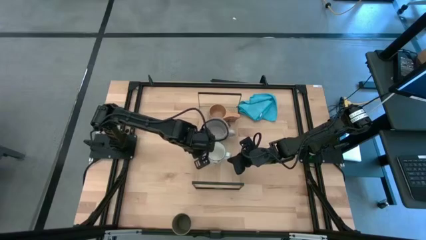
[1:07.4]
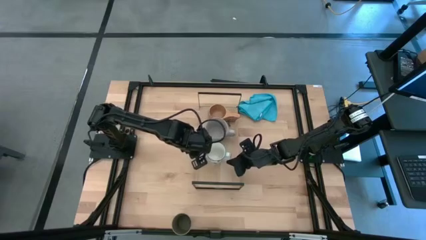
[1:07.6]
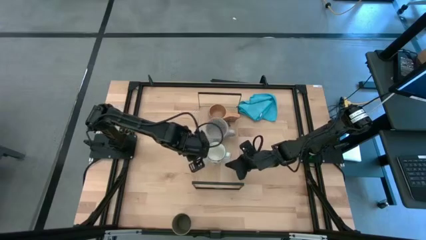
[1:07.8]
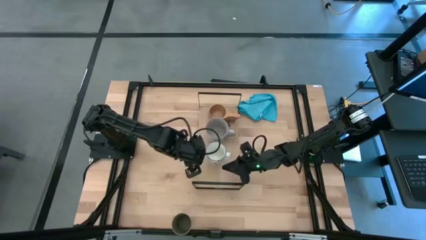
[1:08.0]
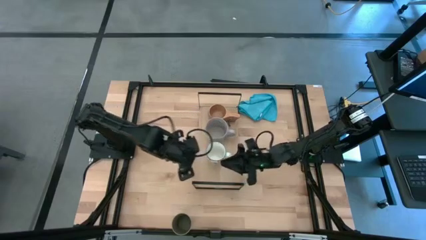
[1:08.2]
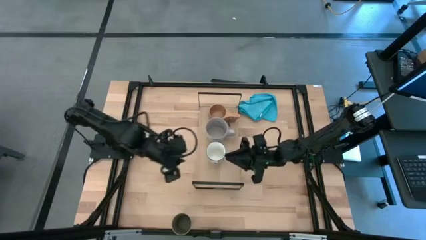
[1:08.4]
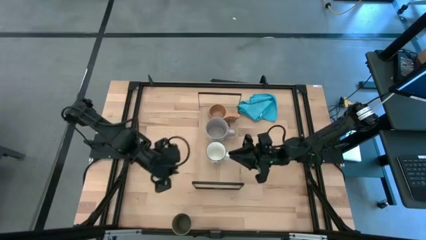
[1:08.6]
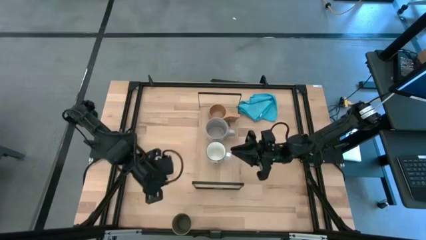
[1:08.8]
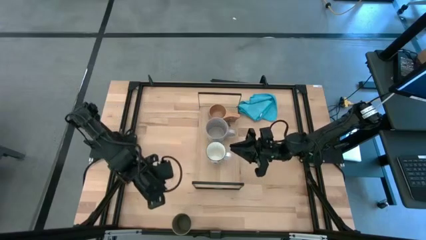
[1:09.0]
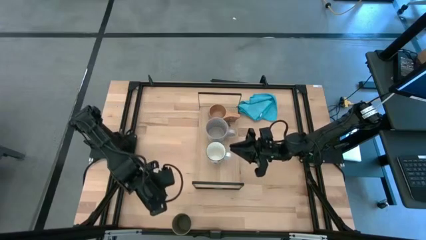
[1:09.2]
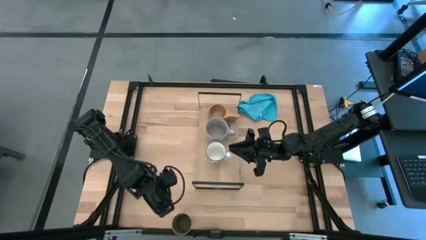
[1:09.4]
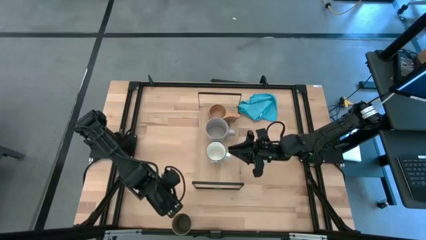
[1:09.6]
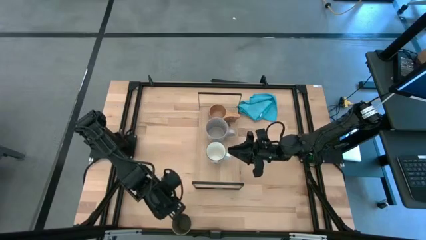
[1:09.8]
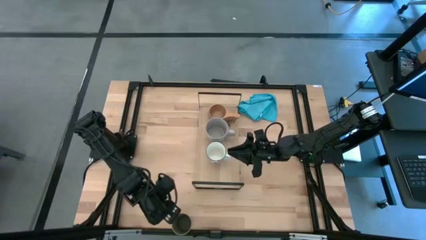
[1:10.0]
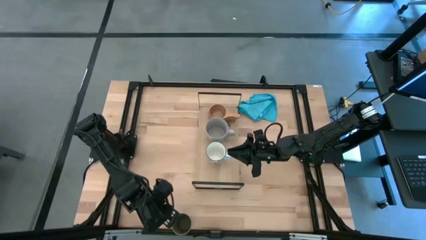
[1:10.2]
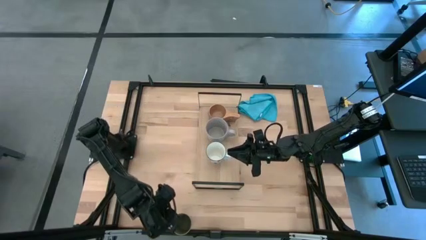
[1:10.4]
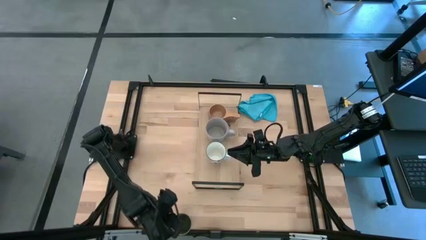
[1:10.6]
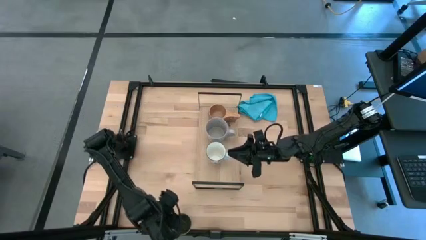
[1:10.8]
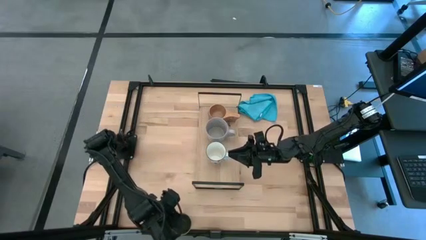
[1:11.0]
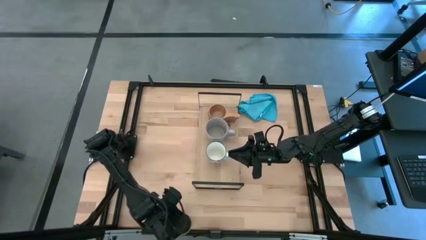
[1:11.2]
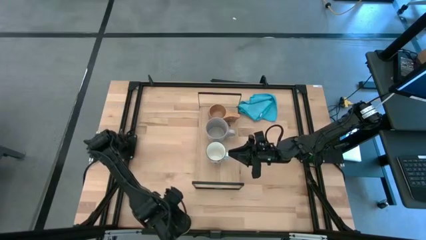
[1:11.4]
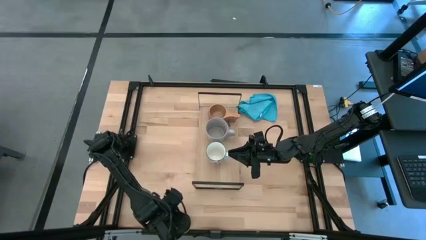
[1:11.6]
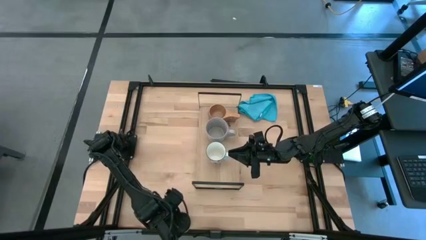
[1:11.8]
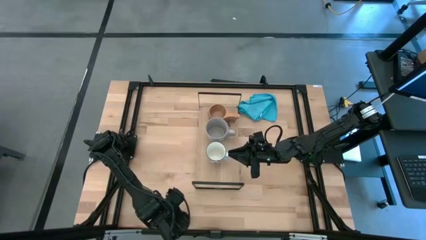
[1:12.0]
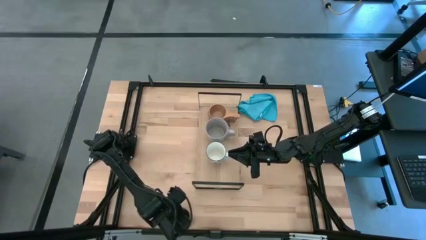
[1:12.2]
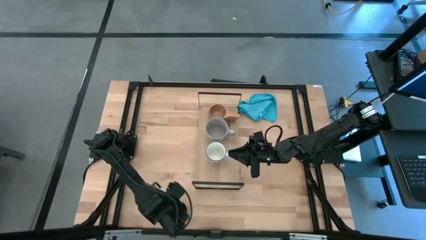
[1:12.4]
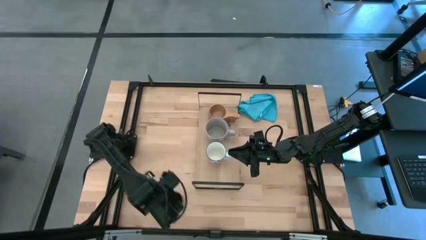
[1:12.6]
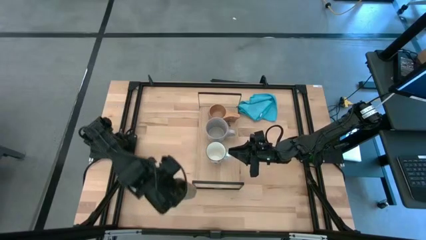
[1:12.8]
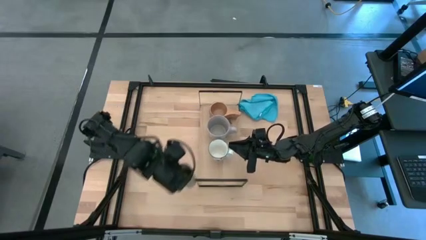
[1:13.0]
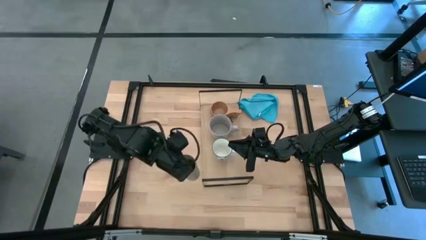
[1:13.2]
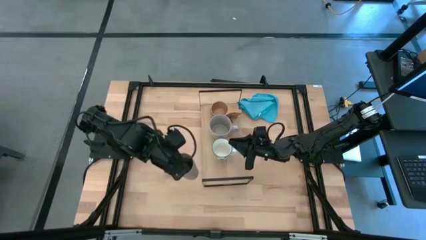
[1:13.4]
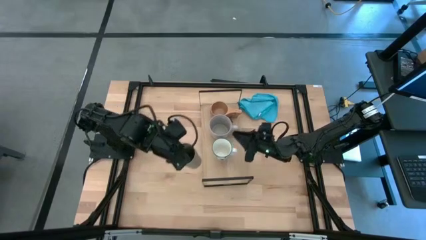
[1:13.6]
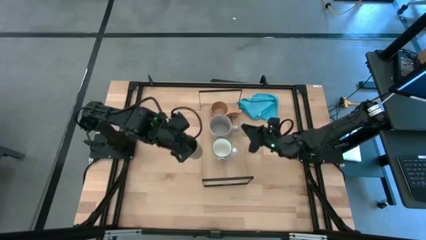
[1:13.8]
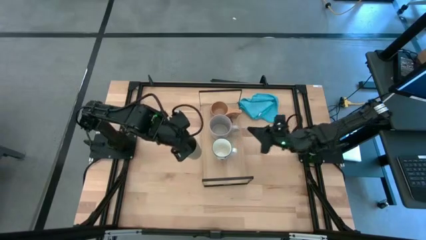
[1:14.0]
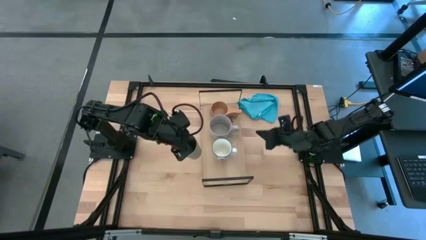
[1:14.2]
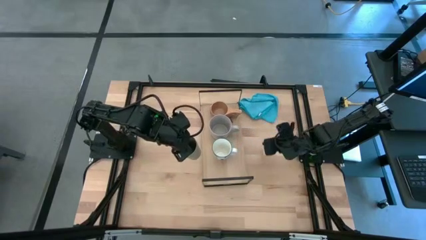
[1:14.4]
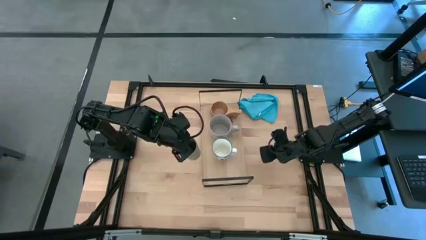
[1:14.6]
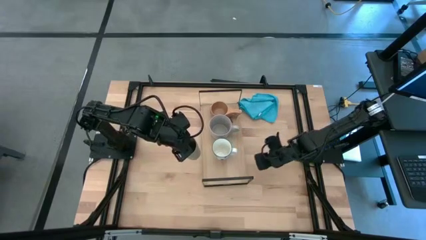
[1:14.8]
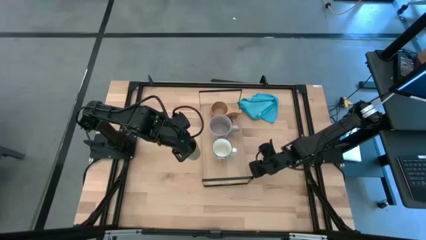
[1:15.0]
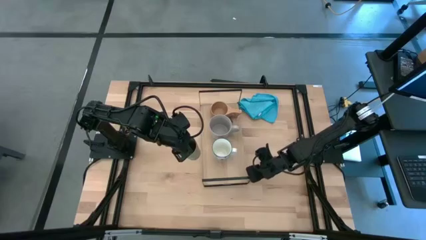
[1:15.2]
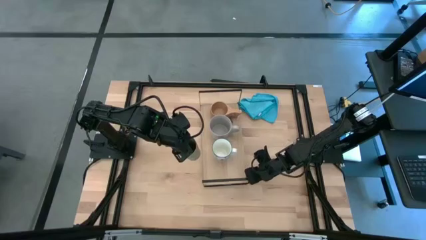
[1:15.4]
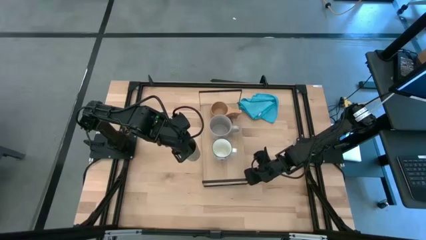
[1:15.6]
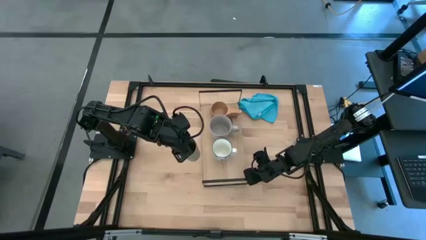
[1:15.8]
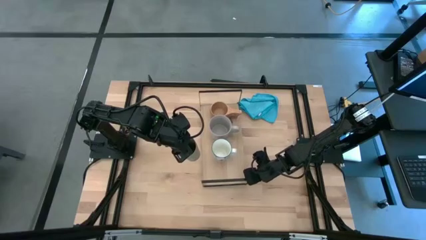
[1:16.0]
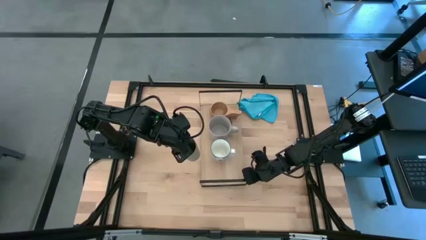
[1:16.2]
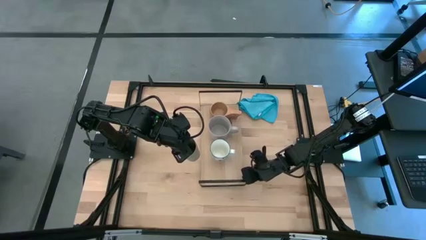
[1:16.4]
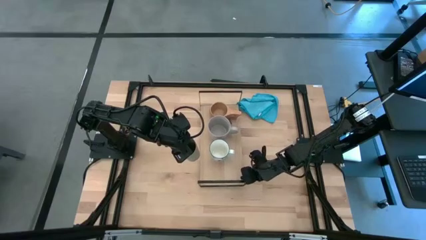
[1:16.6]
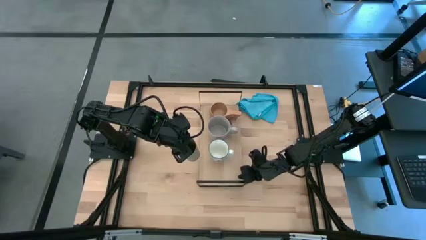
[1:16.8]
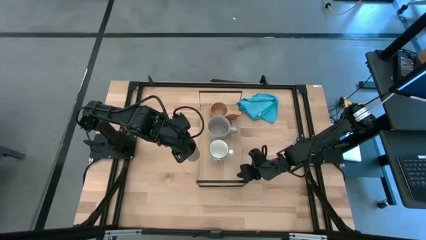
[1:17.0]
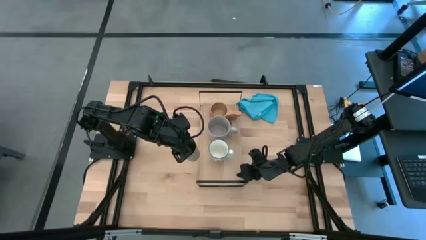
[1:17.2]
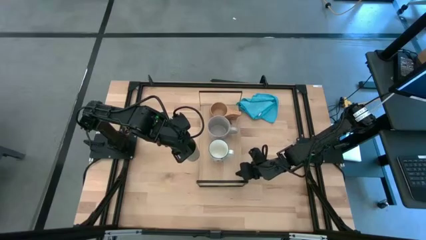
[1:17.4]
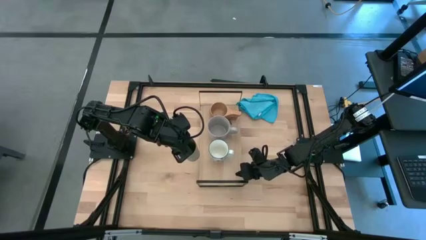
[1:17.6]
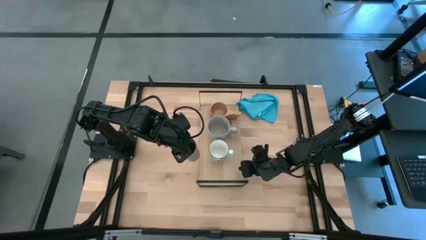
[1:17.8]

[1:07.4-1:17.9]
Task: Stack small to large cups/mugs on shelf
Put the gray cup on the shelf

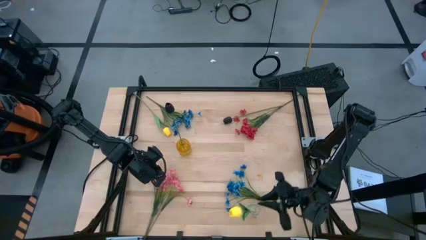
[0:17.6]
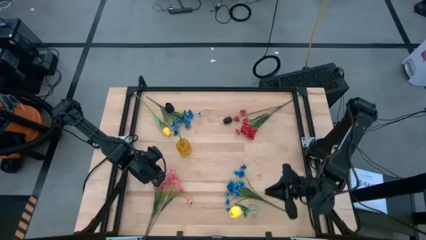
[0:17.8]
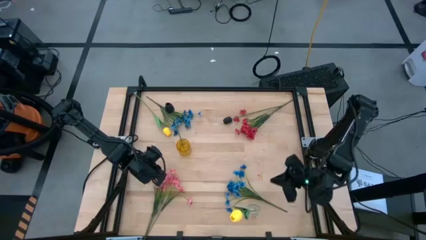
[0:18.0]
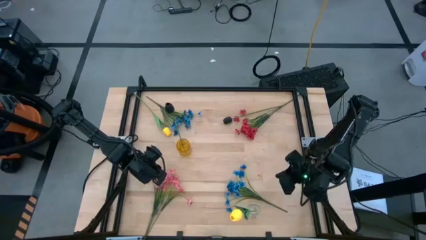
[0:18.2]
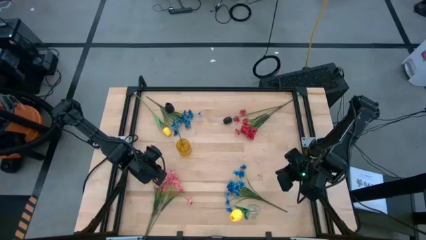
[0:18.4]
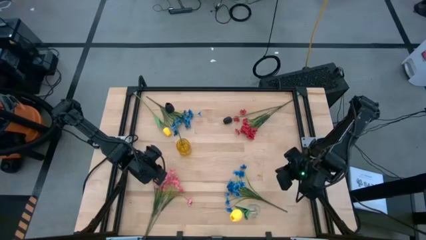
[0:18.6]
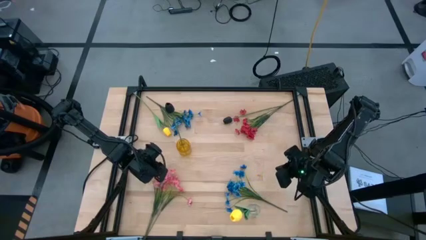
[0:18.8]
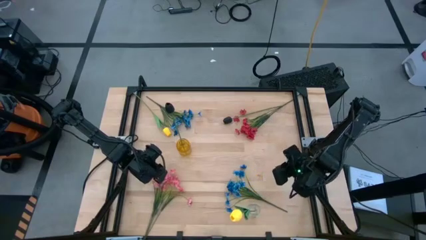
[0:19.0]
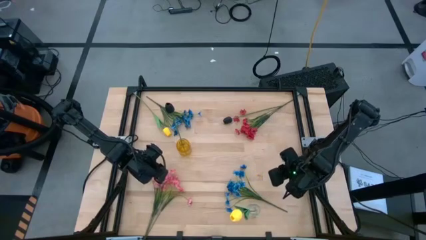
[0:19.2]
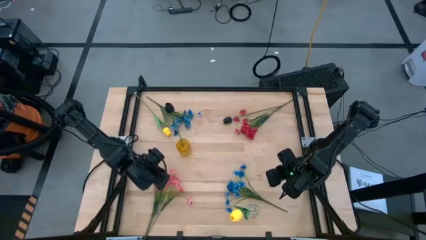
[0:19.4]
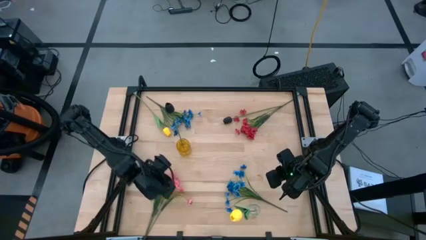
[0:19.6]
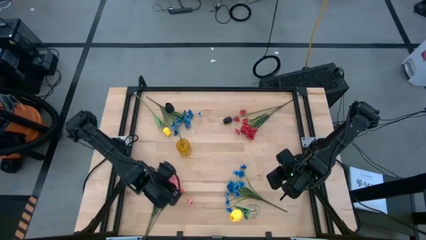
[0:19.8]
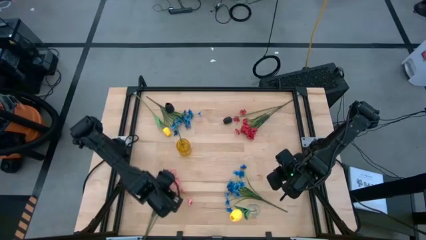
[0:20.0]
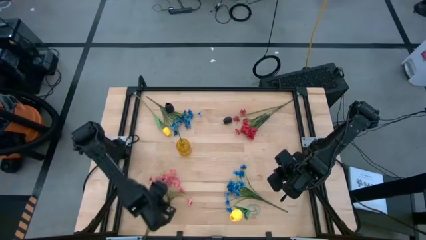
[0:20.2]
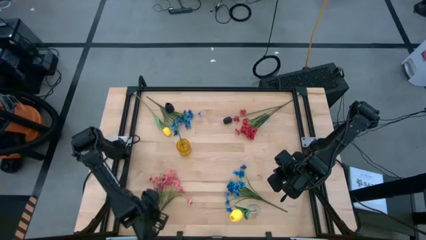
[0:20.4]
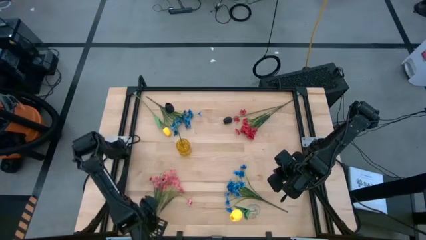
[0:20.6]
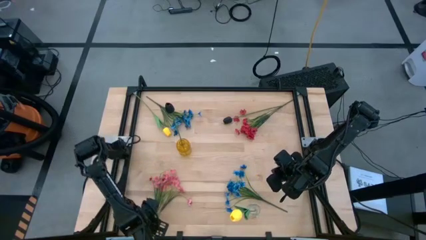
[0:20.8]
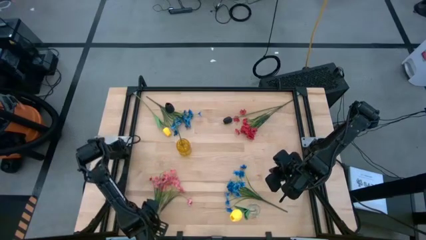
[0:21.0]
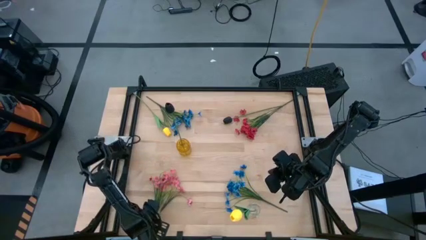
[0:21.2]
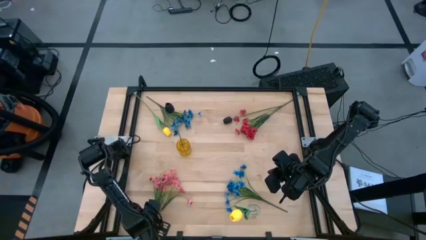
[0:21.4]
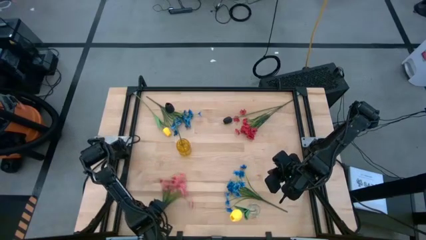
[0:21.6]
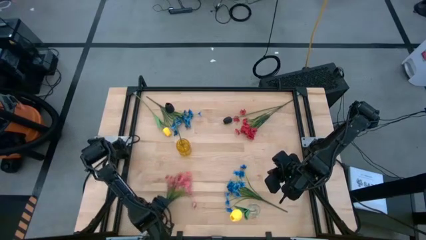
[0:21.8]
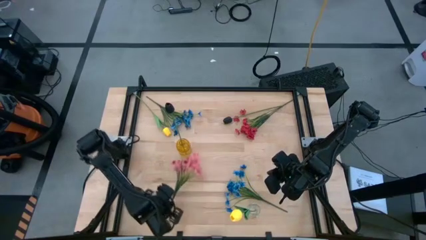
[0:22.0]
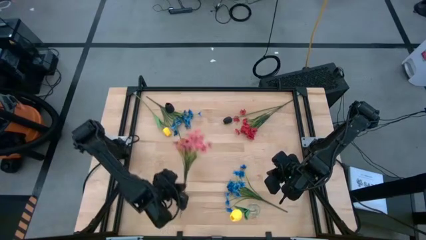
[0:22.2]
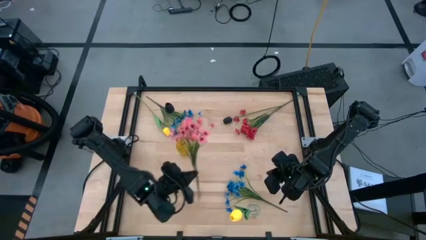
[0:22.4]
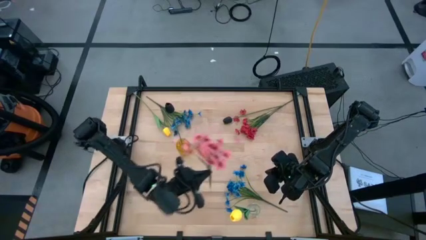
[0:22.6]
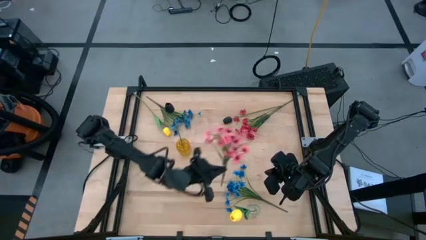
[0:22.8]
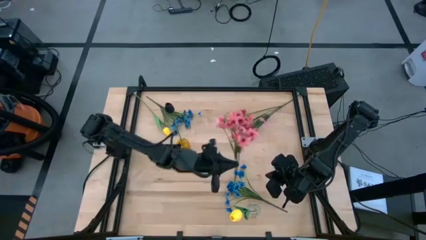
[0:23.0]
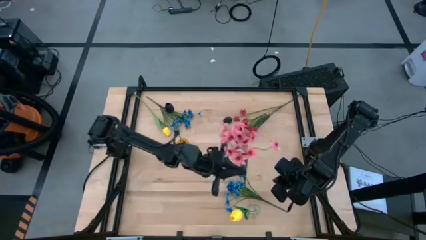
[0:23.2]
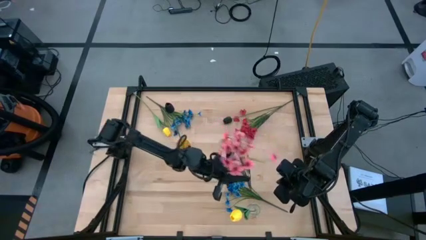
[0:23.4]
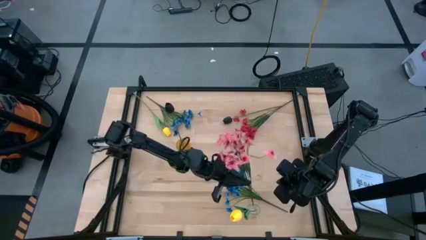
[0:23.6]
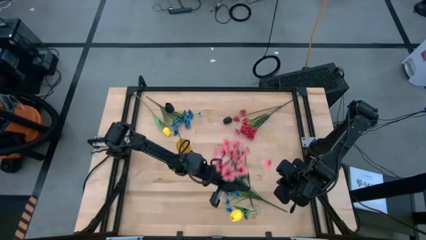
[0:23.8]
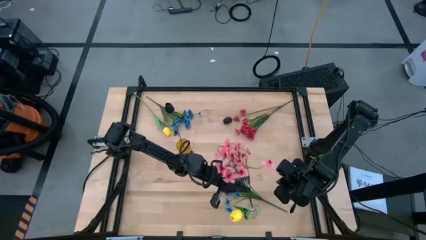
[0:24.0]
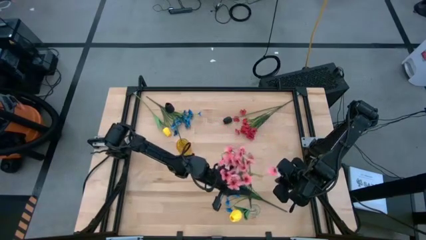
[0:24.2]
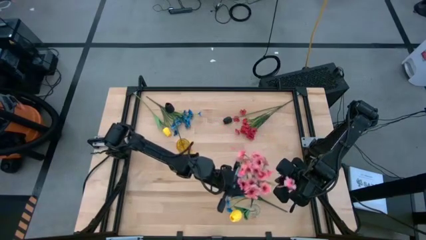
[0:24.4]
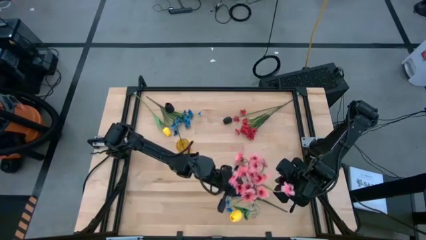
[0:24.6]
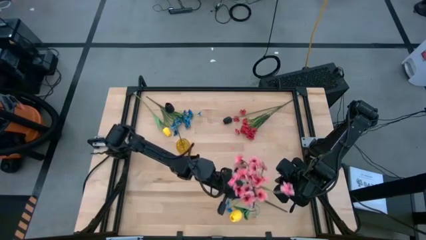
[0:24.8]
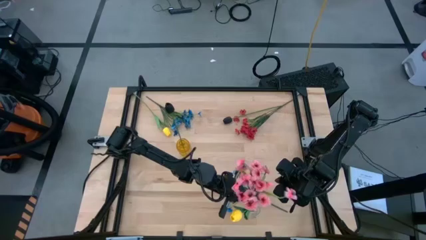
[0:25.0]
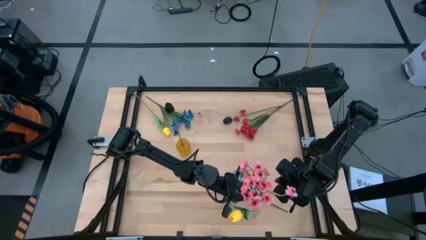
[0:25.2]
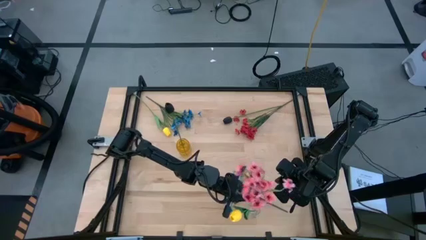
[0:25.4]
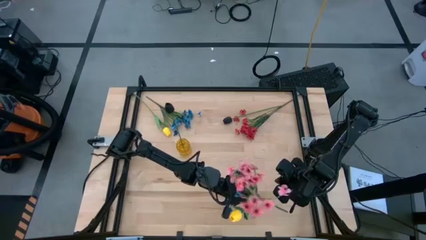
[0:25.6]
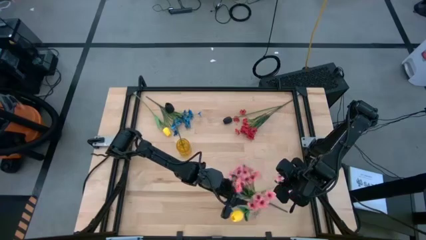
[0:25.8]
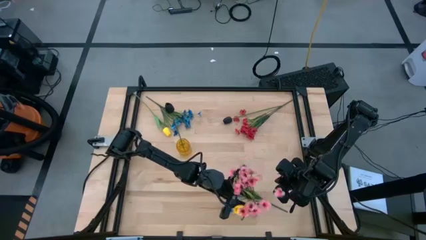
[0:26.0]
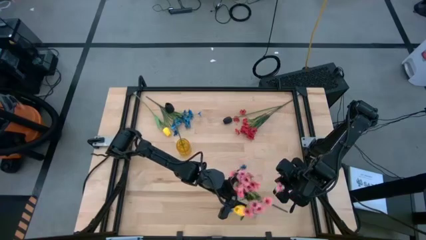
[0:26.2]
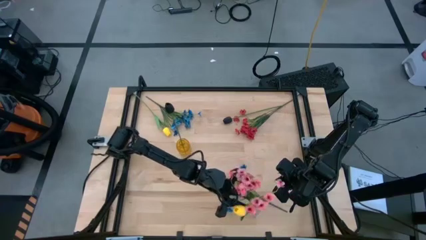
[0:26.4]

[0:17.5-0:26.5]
Task: Sort flowers into vase by color
Put the pink flowers into the transparent vase
